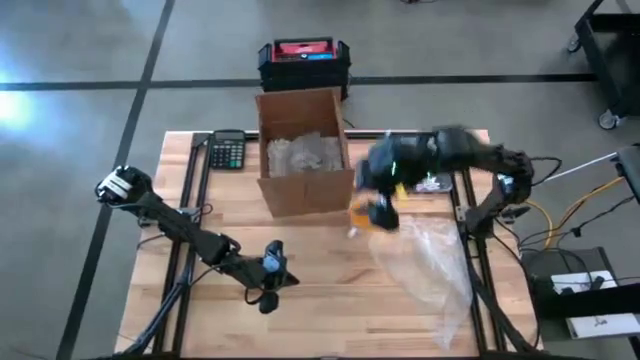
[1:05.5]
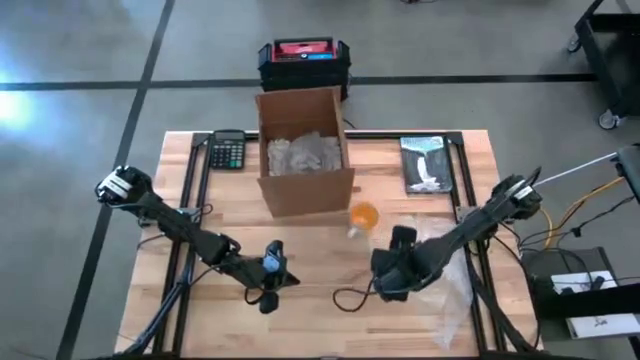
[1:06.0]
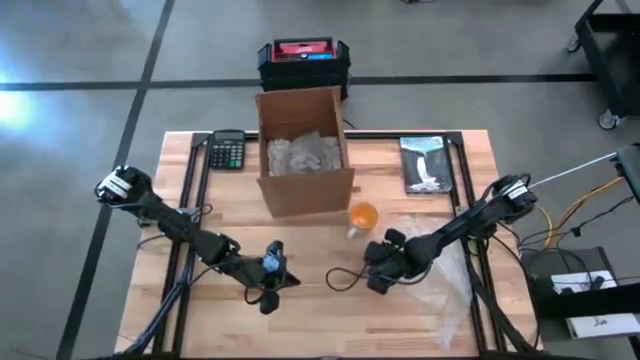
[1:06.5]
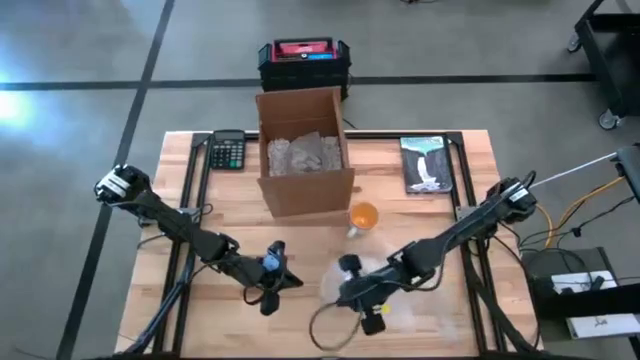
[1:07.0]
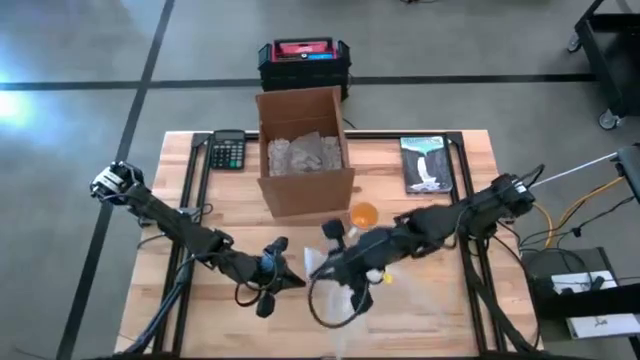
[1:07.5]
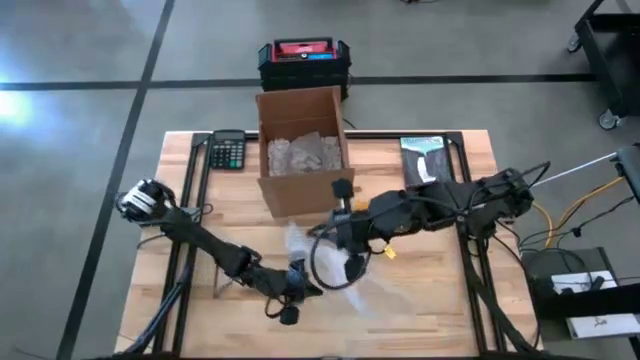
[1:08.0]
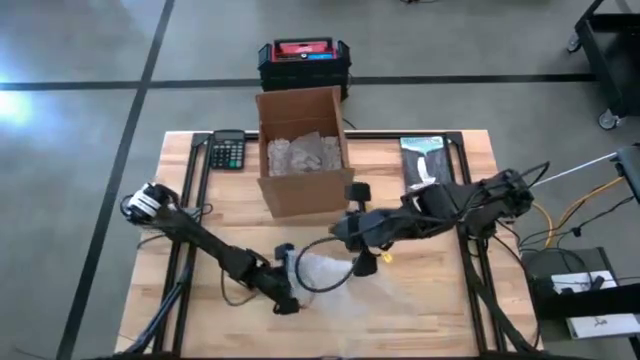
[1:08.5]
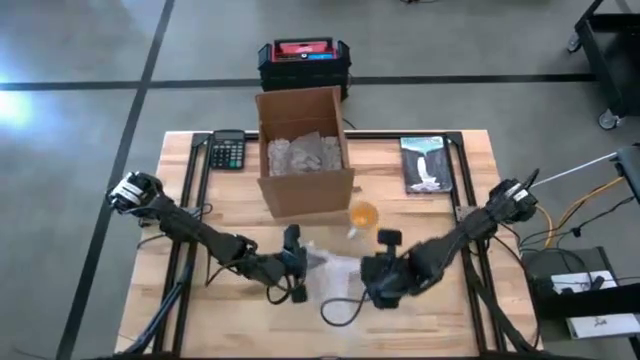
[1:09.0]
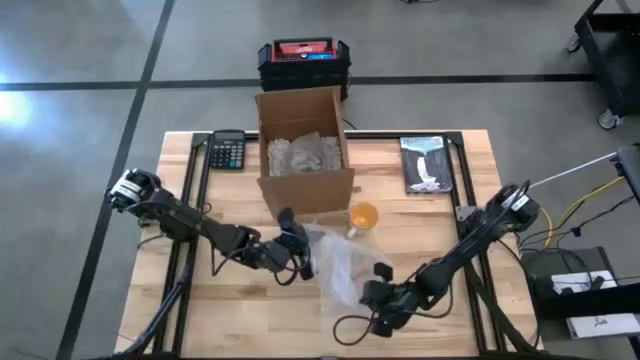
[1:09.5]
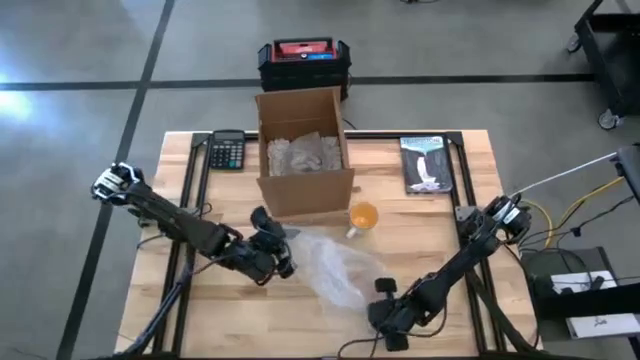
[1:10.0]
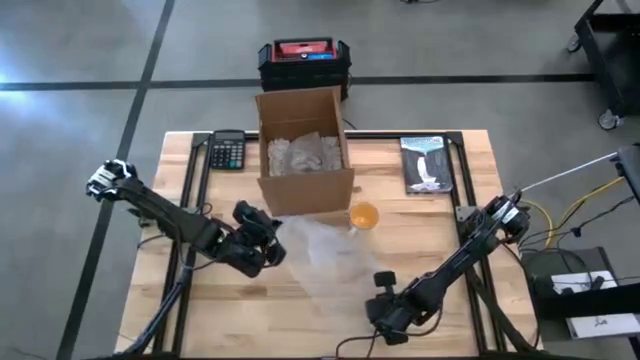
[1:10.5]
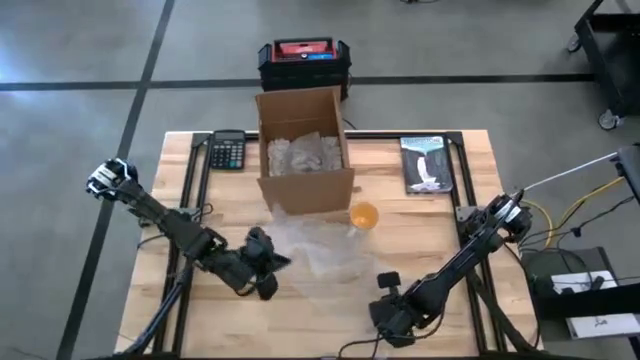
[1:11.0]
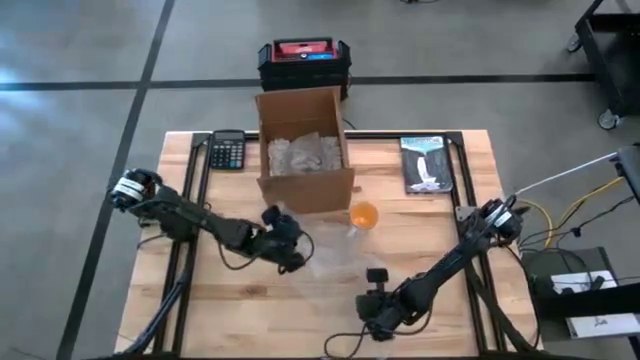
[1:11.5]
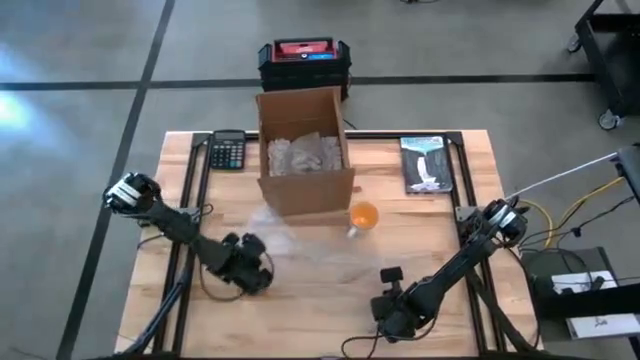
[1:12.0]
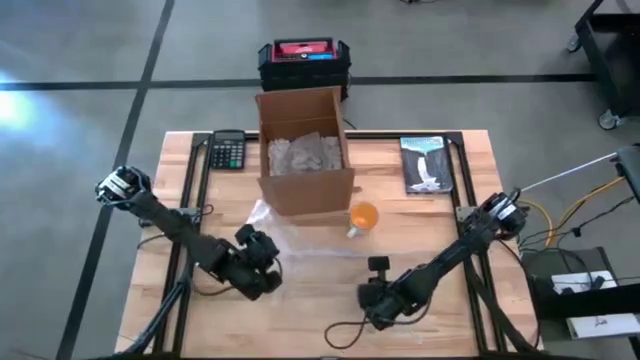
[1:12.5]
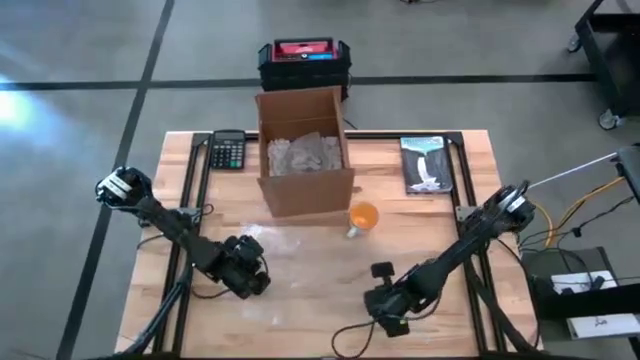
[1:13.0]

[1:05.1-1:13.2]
Task: wrap mug
Prepare the transparent bubble wrap

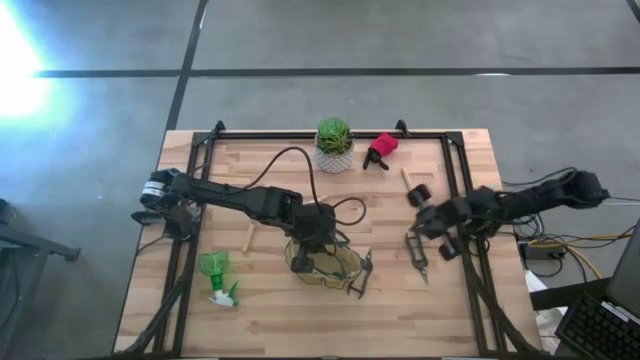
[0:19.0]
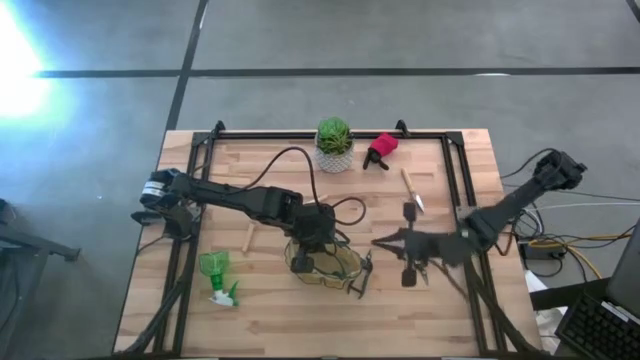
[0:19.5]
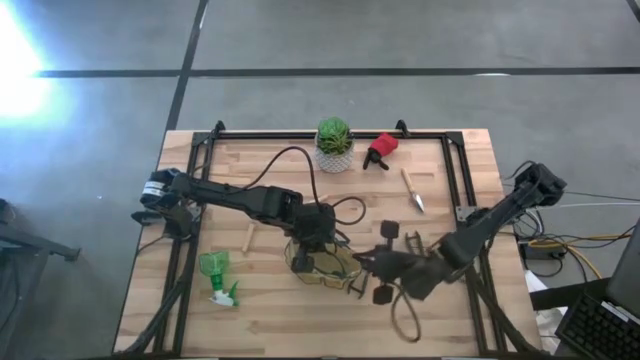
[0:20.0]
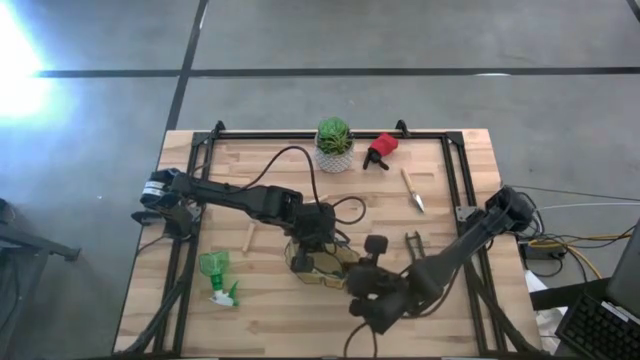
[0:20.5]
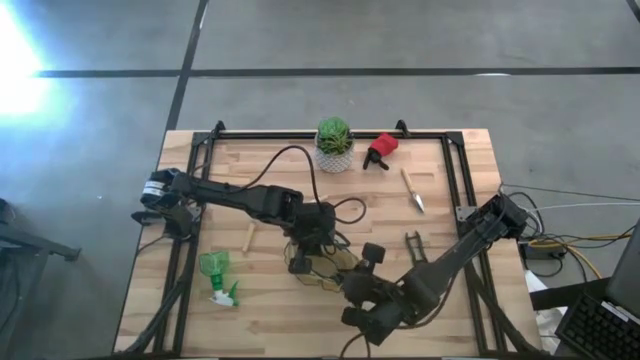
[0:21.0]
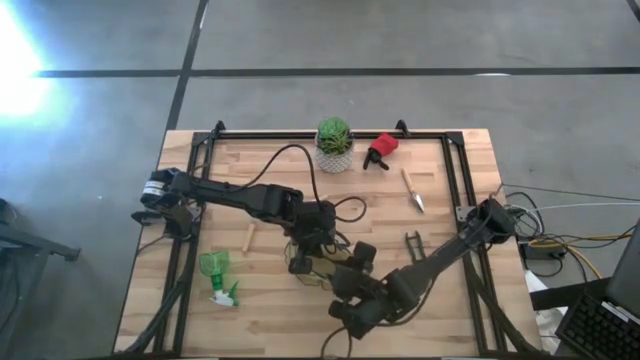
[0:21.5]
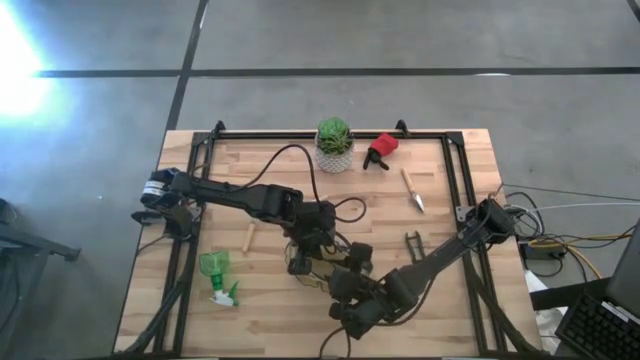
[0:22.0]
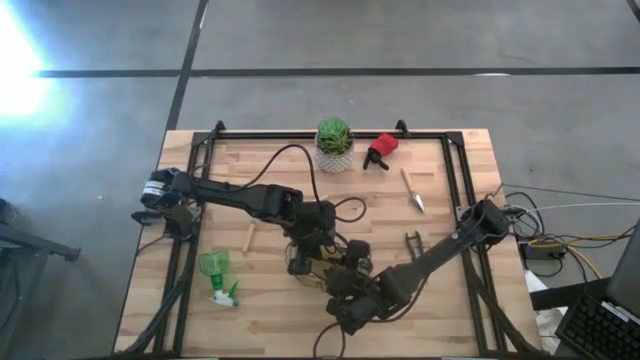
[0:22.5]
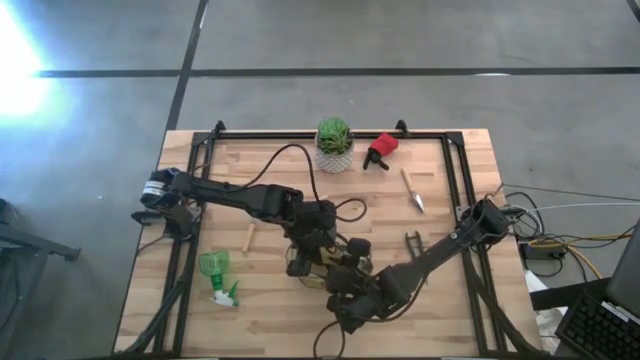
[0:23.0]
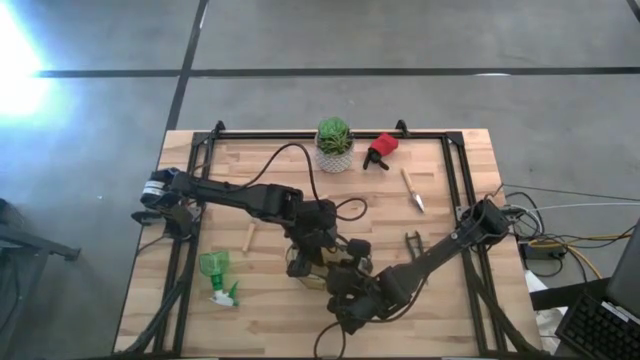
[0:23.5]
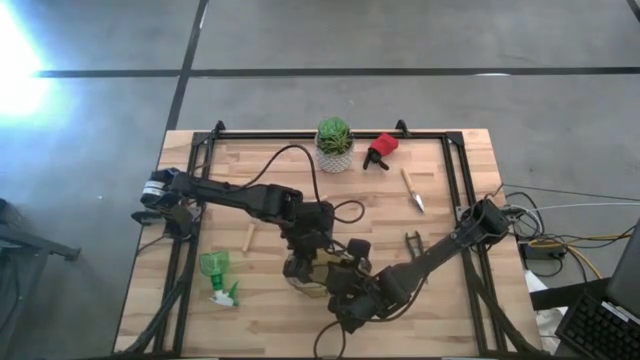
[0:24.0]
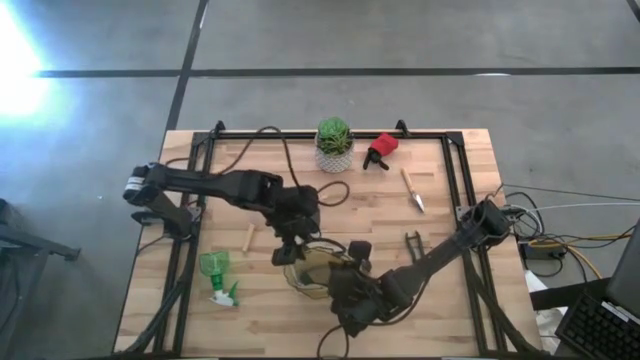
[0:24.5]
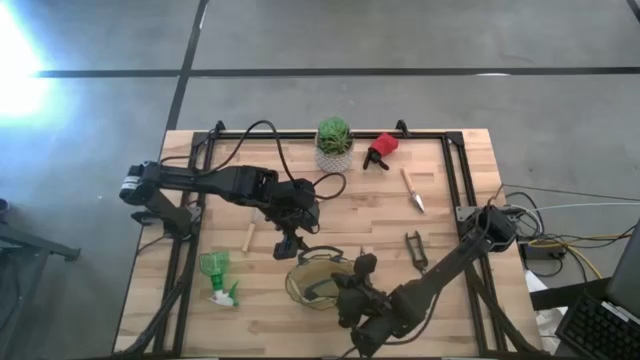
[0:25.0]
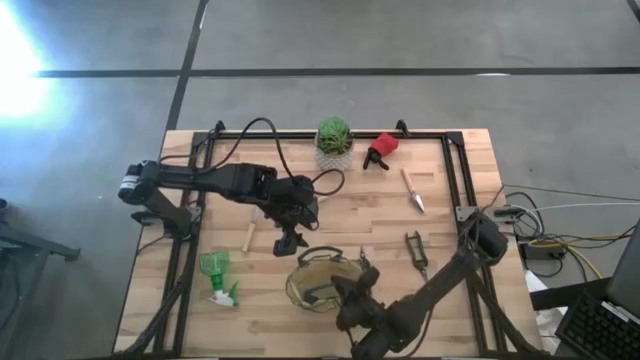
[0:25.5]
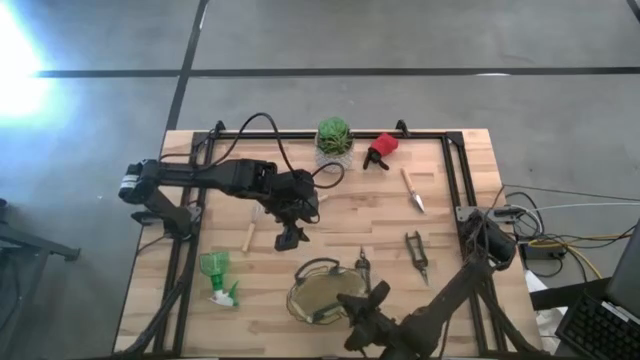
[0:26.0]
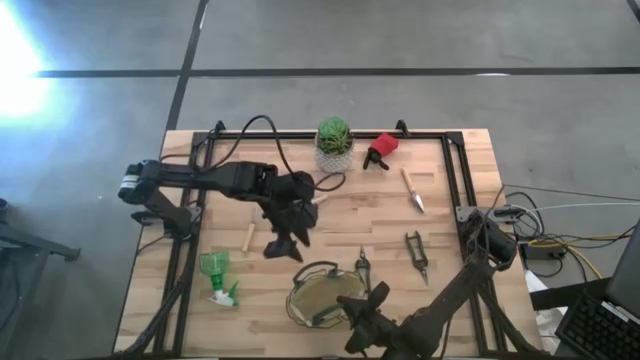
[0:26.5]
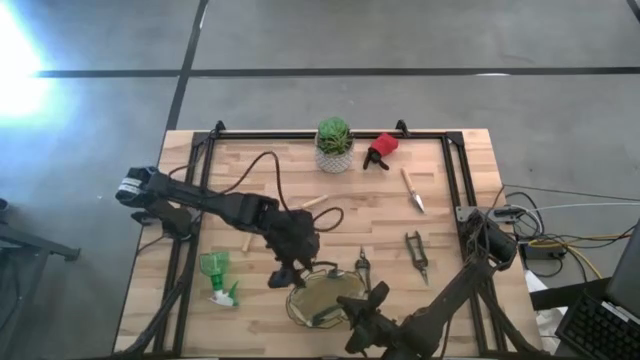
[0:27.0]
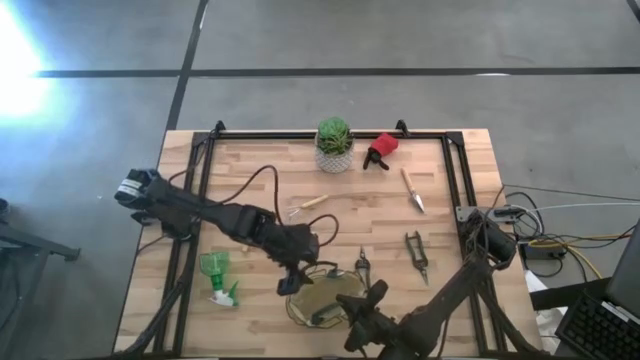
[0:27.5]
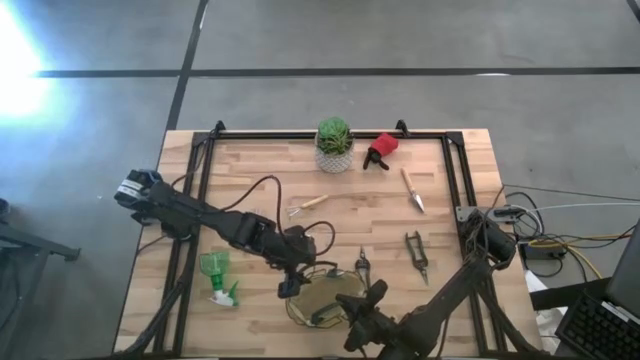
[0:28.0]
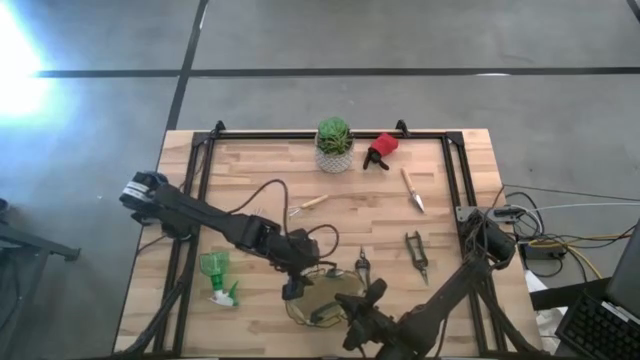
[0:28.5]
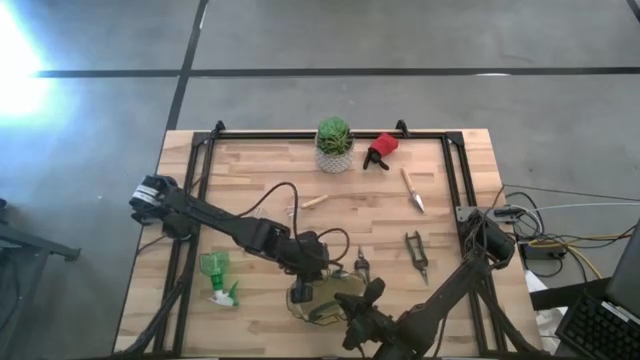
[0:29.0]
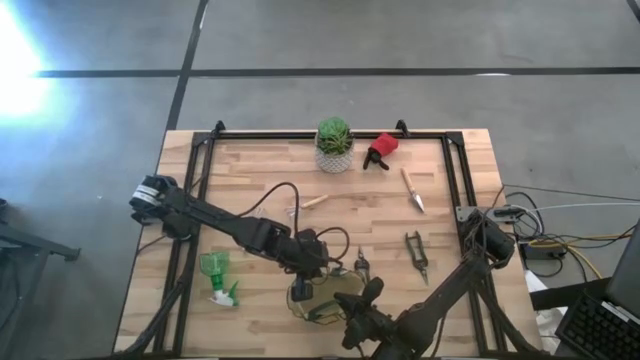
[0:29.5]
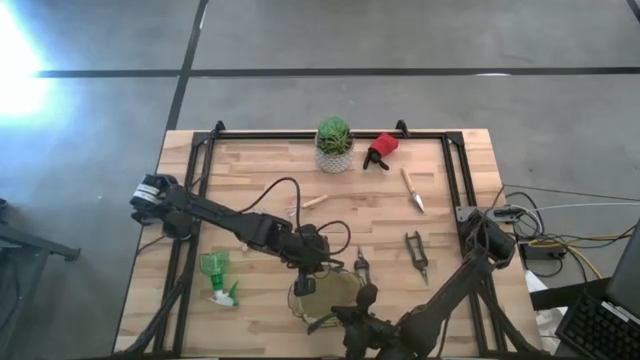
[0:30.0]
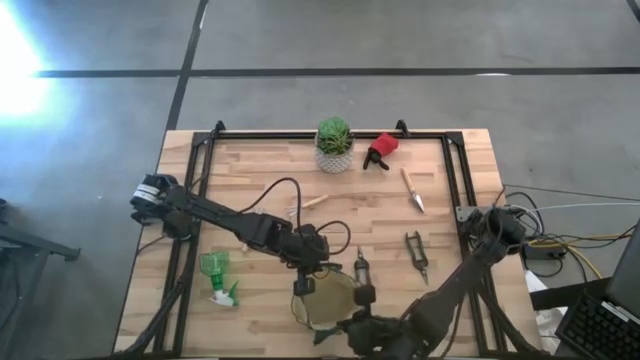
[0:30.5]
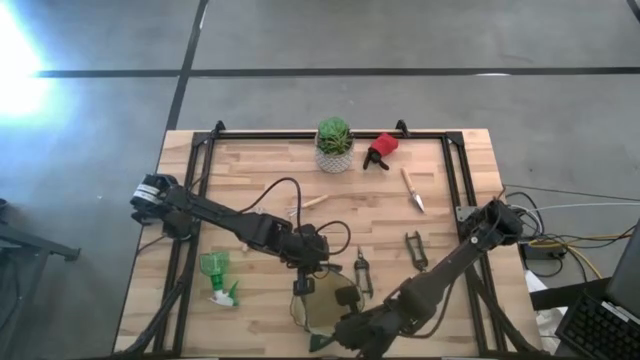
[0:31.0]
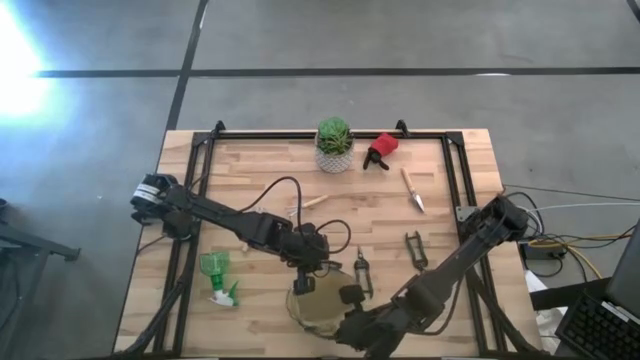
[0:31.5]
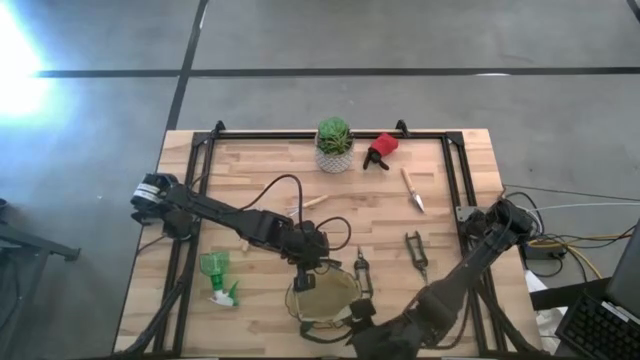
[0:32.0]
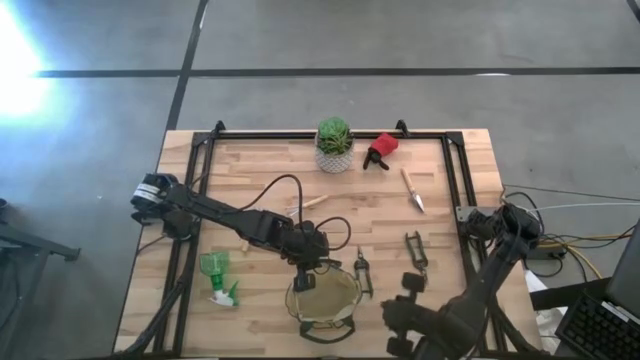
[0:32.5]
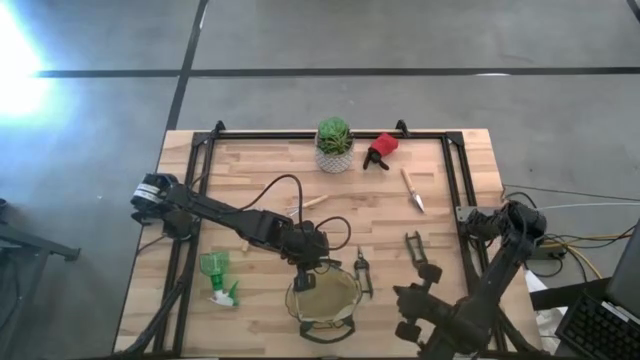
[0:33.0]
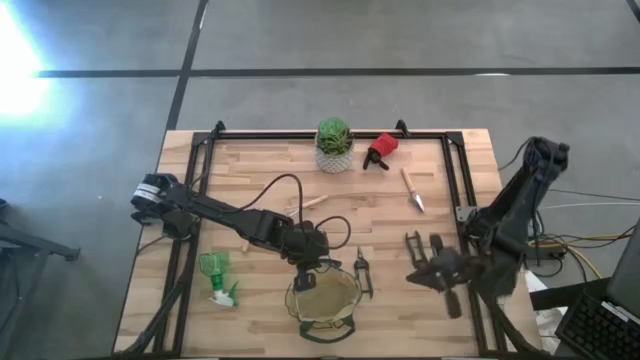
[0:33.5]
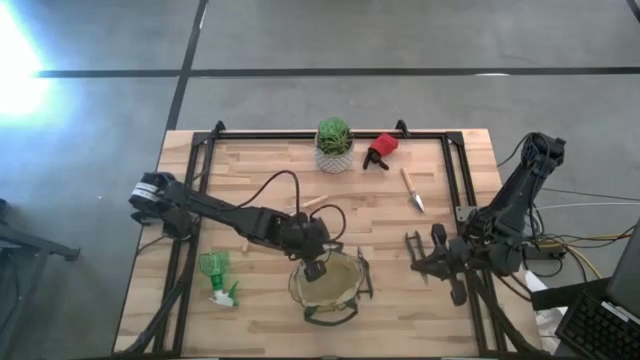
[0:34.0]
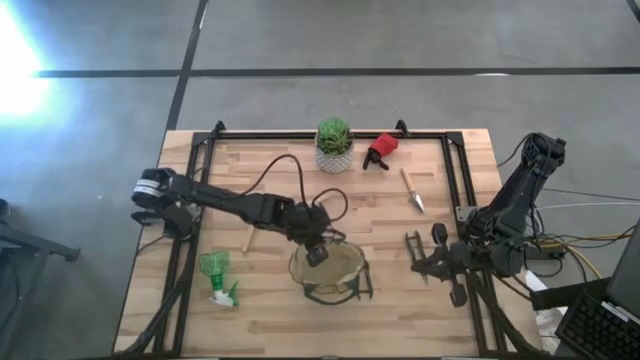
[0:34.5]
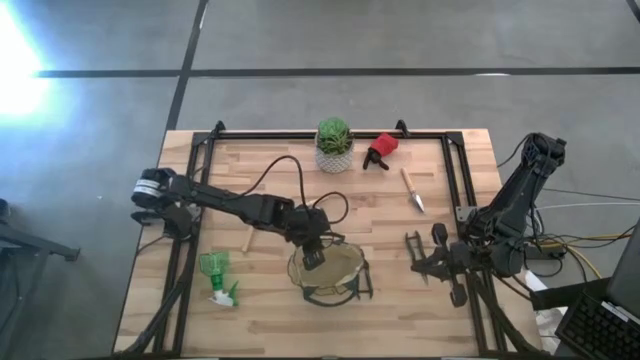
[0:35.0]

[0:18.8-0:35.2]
Task: Pick & Place Garden tools in Gardening bag
Move the white gardening bag to the center of the table
